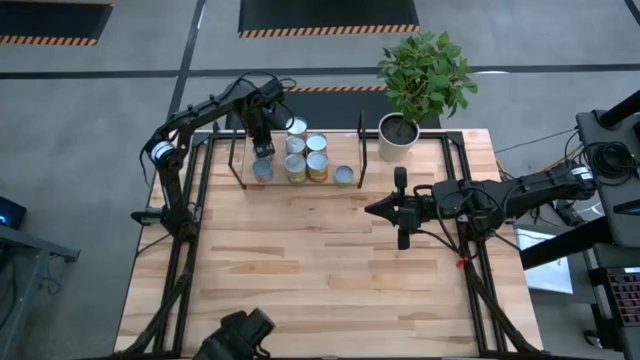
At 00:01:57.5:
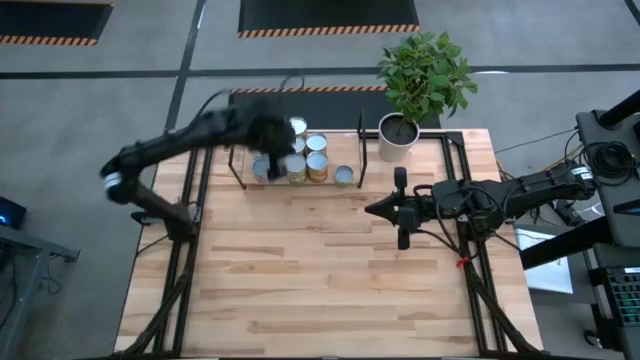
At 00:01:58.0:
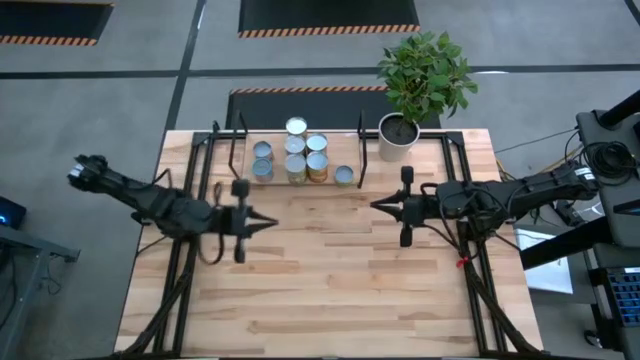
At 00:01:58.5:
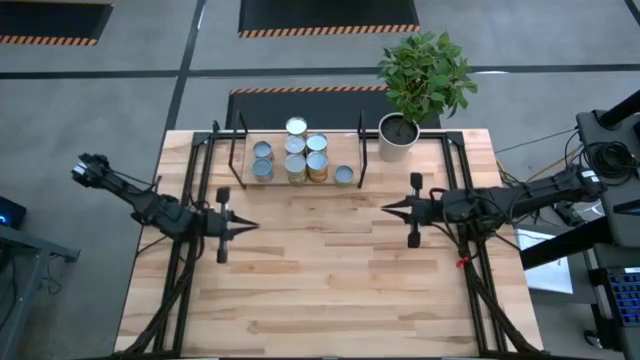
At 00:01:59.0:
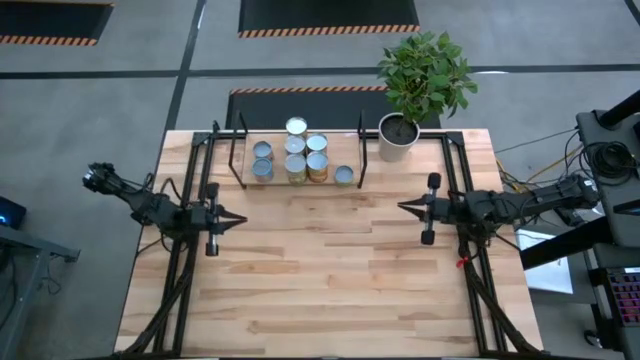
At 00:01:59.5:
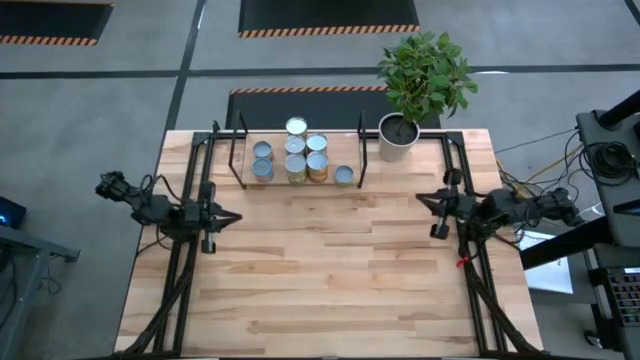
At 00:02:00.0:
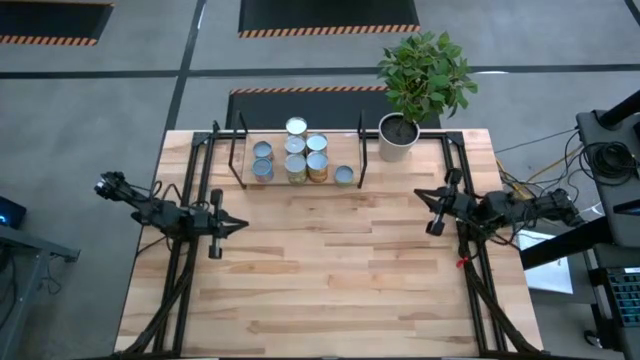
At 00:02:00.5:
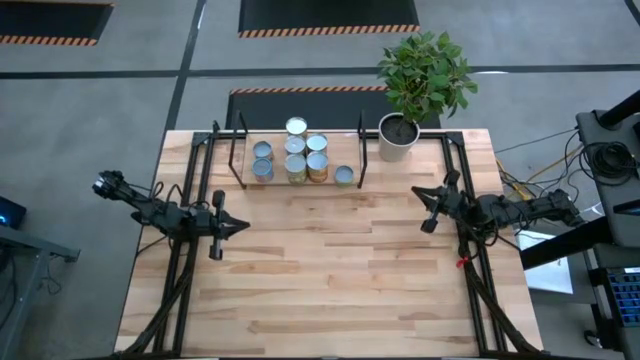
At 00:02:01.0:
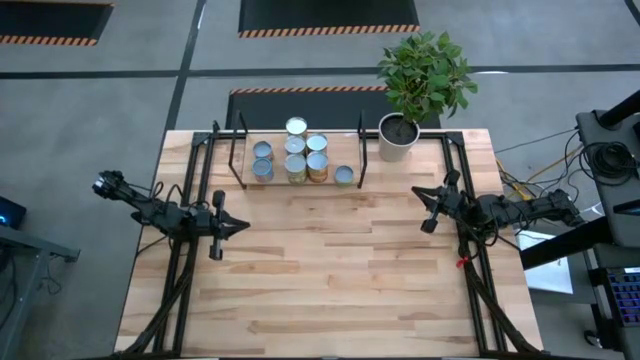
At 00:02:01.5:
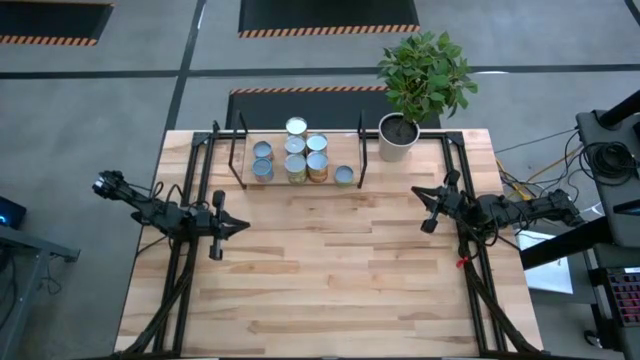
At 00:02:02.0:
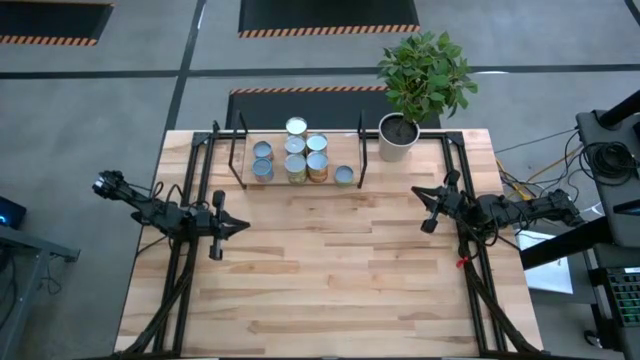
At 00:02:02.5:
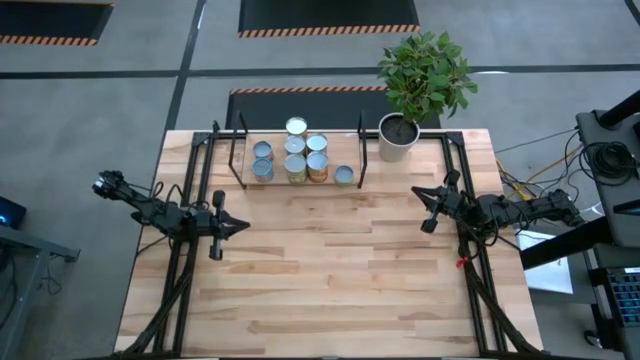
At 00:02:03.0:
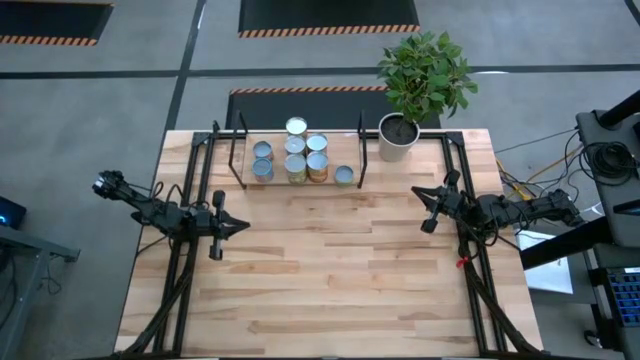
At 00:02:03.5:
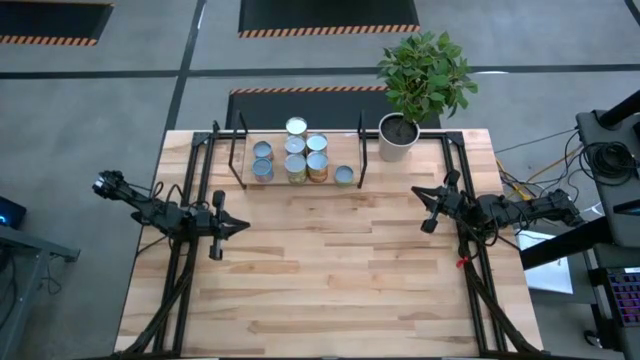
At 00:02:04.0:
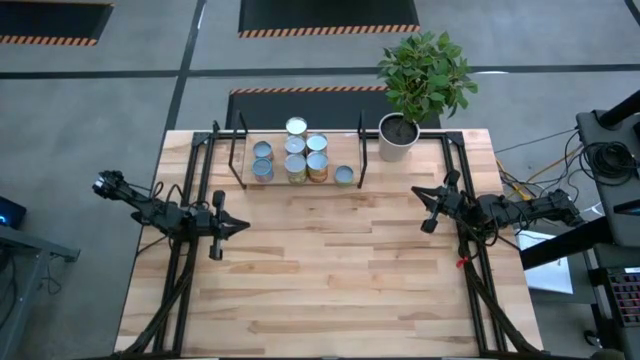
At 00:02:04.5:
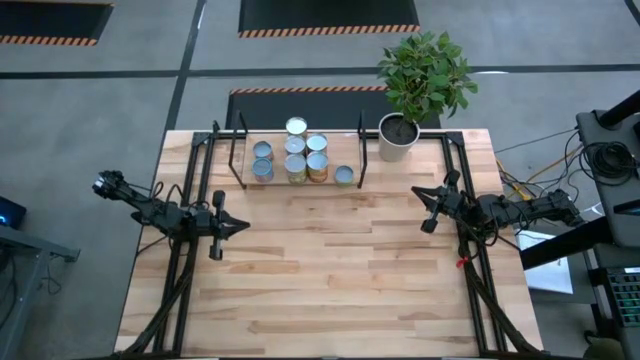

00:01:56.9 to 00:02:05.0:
Task: Pick and place cans onto a shelf
Return to Home Position

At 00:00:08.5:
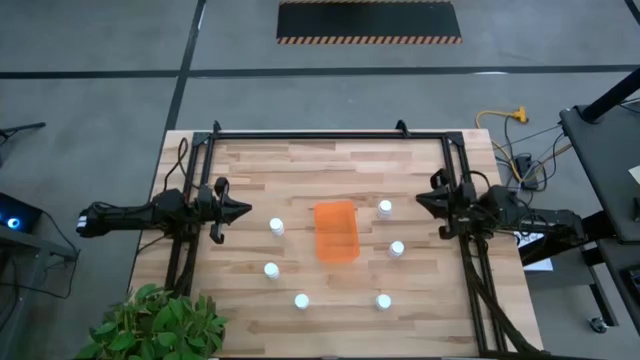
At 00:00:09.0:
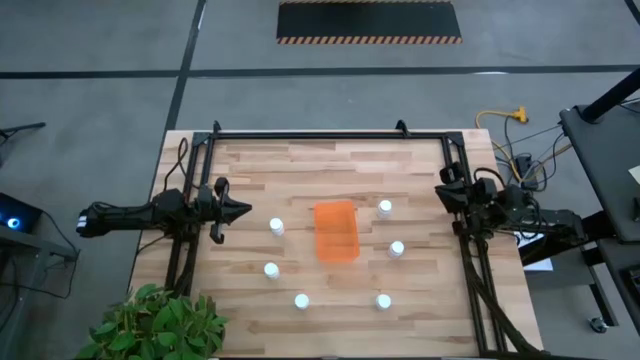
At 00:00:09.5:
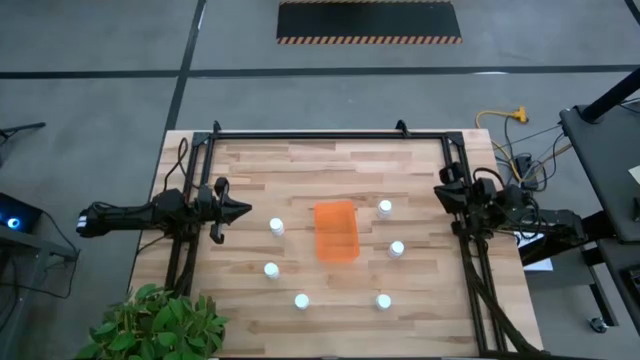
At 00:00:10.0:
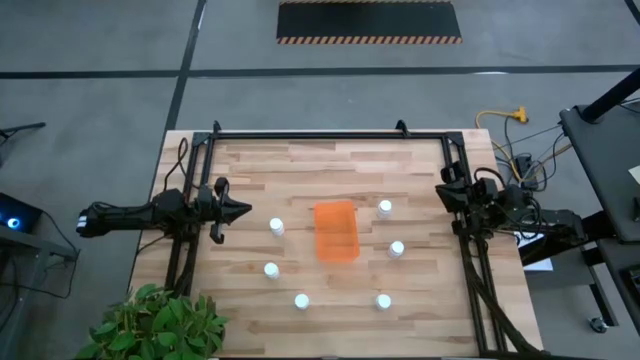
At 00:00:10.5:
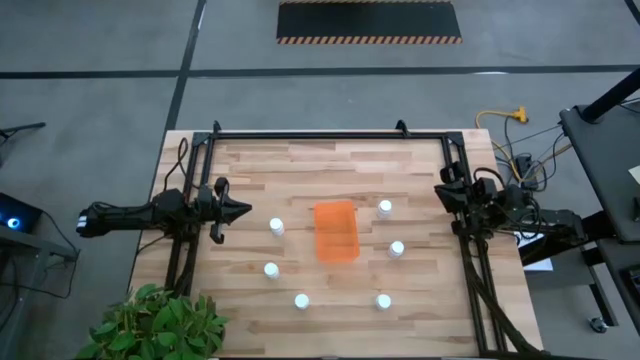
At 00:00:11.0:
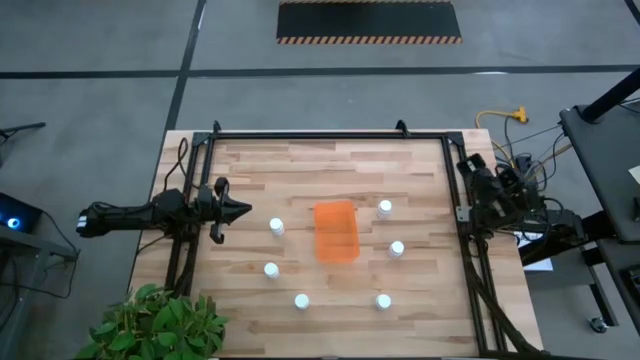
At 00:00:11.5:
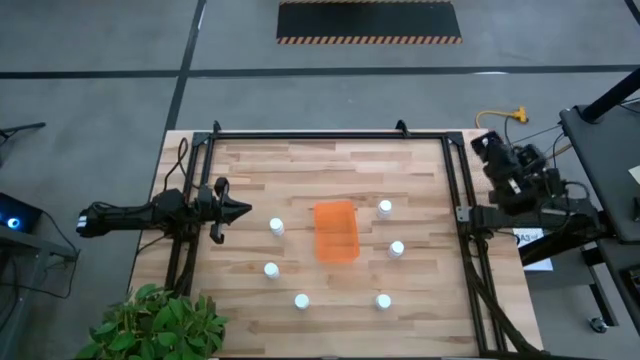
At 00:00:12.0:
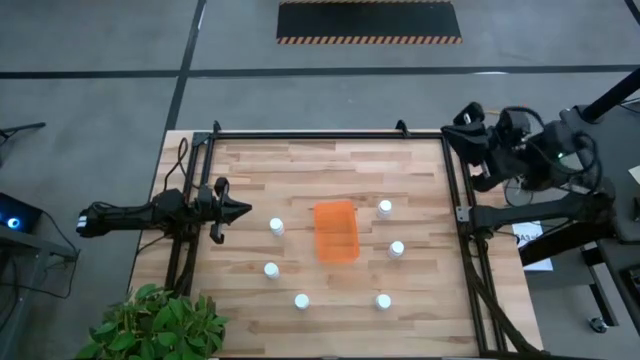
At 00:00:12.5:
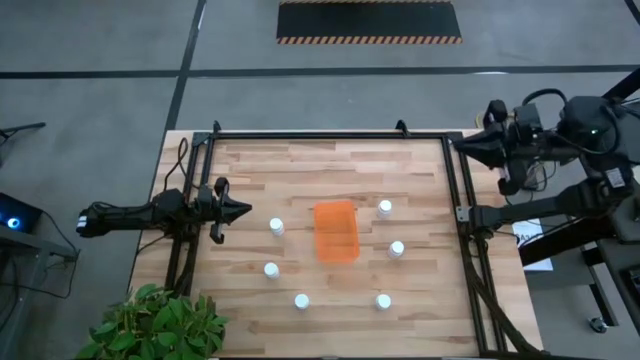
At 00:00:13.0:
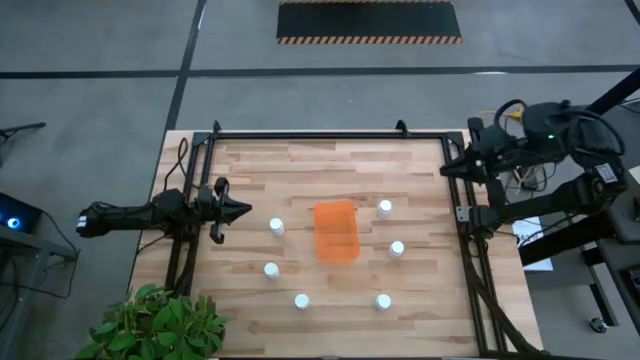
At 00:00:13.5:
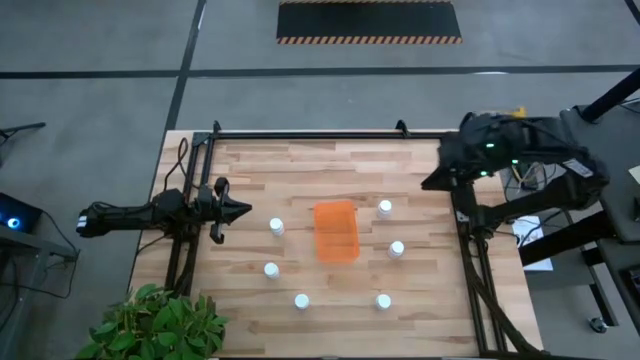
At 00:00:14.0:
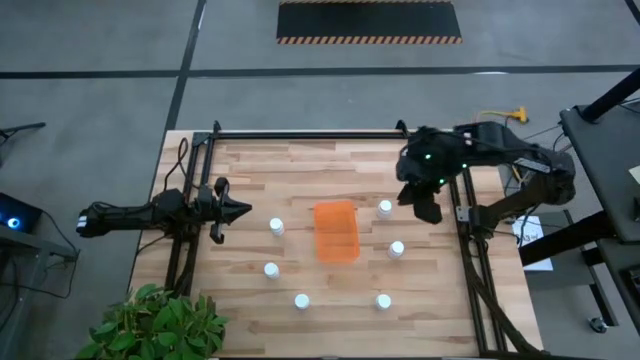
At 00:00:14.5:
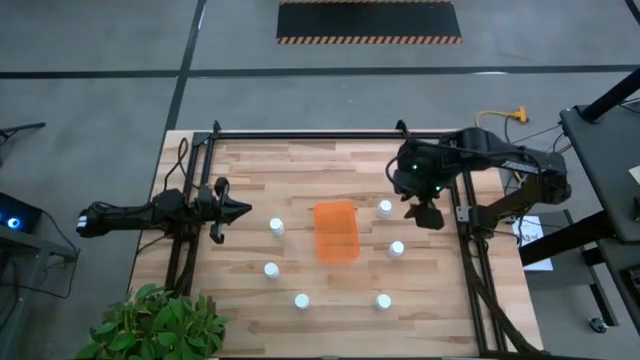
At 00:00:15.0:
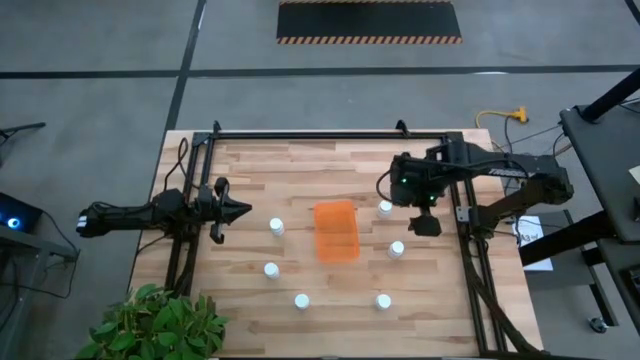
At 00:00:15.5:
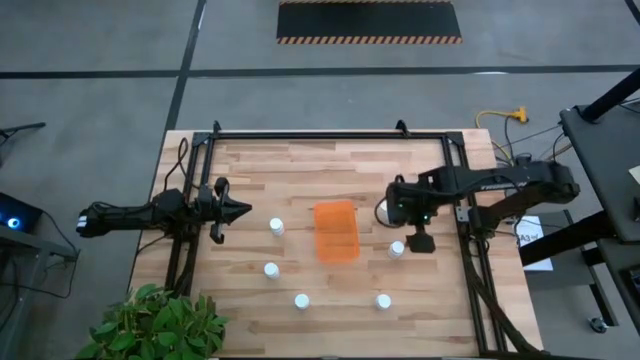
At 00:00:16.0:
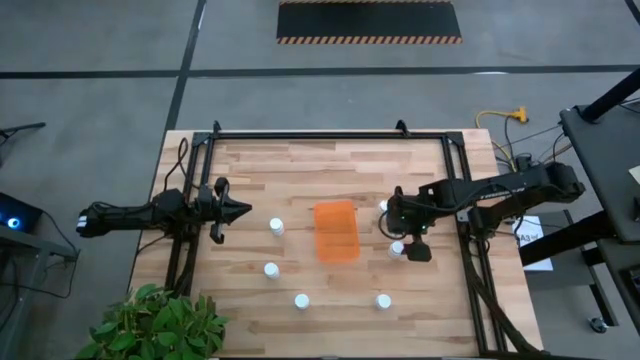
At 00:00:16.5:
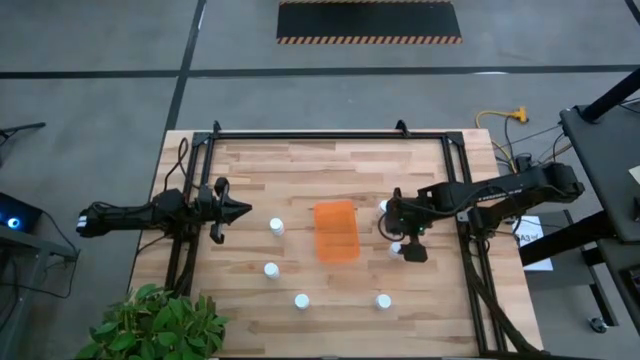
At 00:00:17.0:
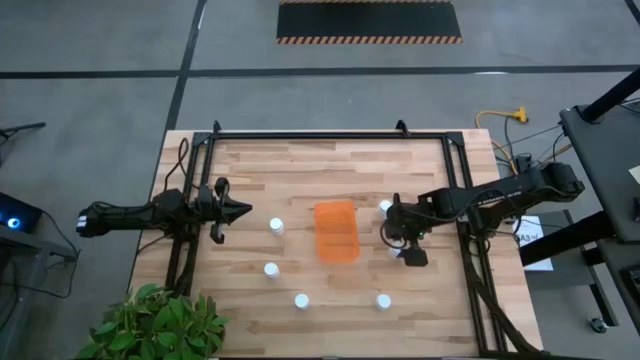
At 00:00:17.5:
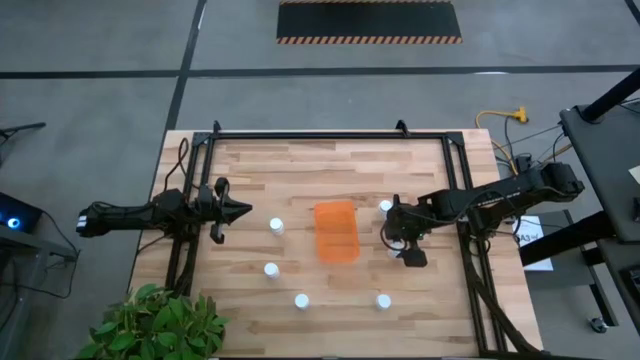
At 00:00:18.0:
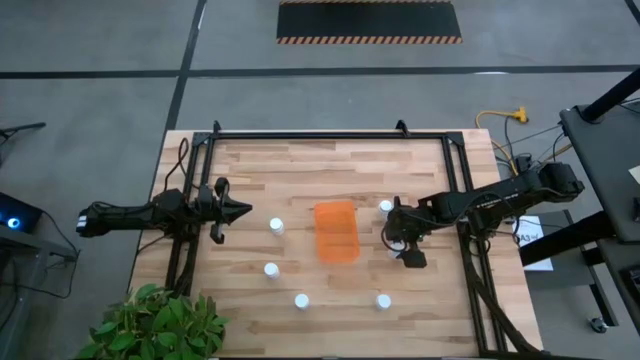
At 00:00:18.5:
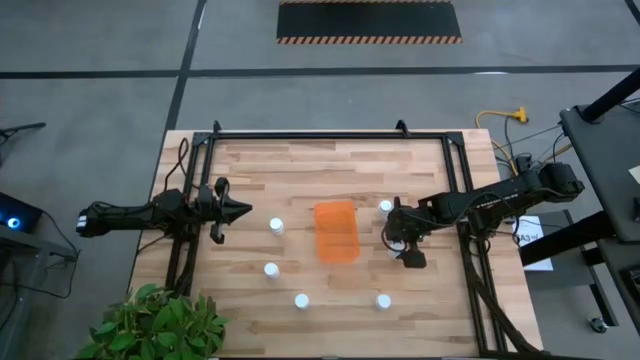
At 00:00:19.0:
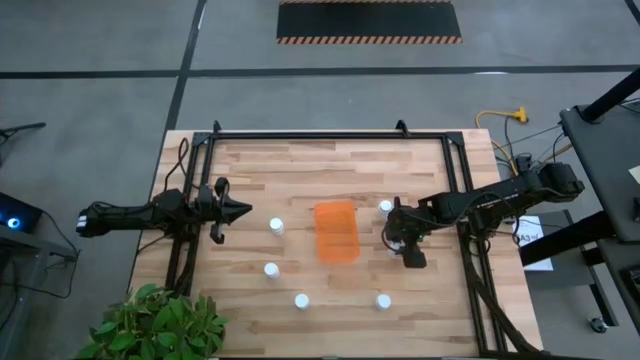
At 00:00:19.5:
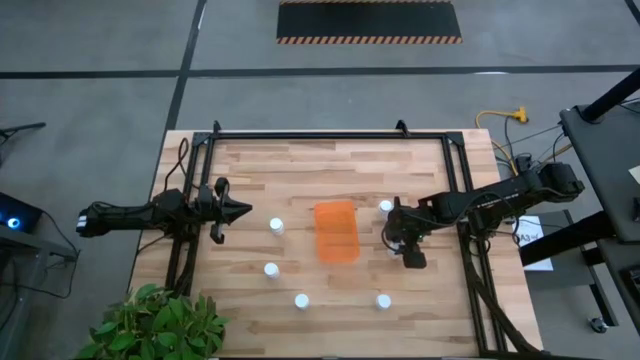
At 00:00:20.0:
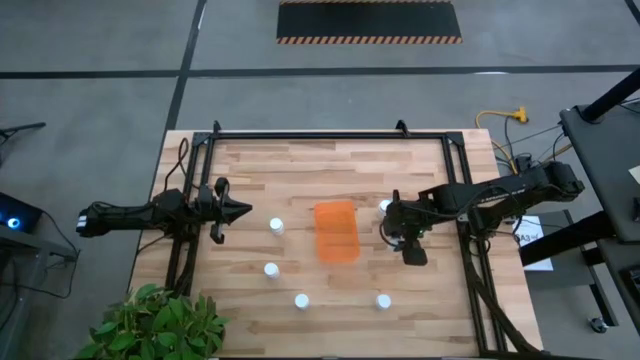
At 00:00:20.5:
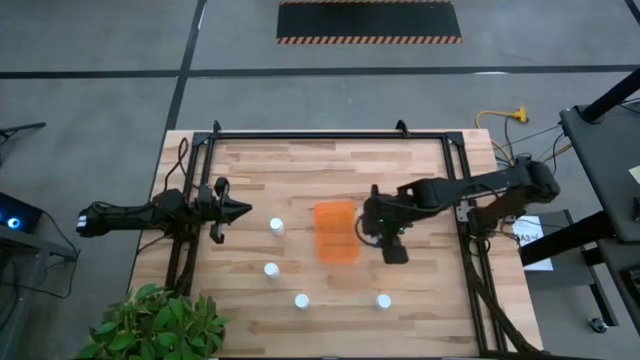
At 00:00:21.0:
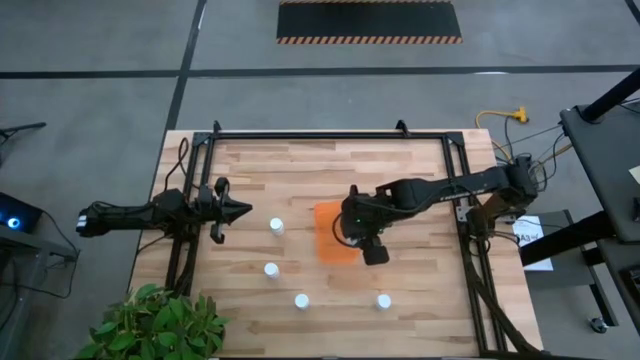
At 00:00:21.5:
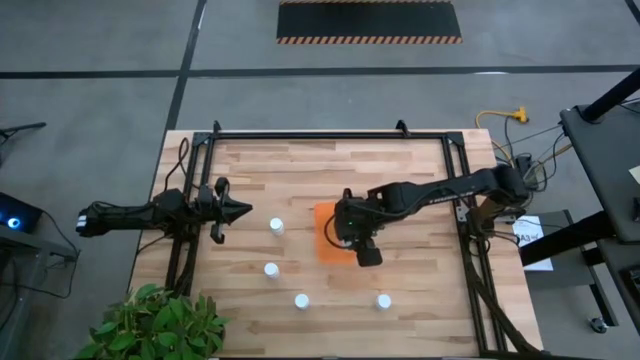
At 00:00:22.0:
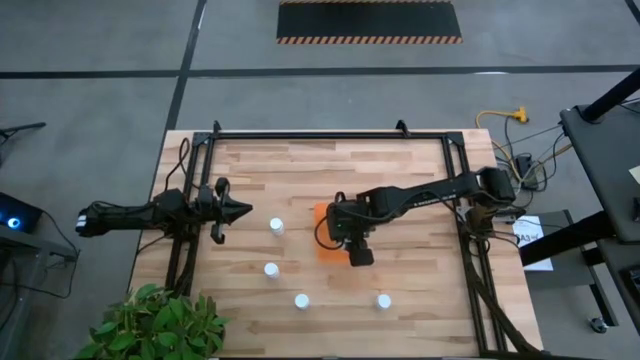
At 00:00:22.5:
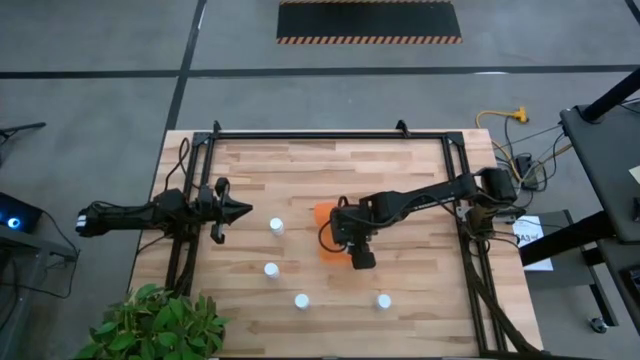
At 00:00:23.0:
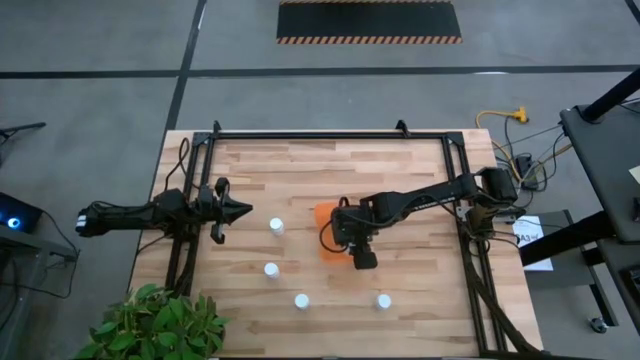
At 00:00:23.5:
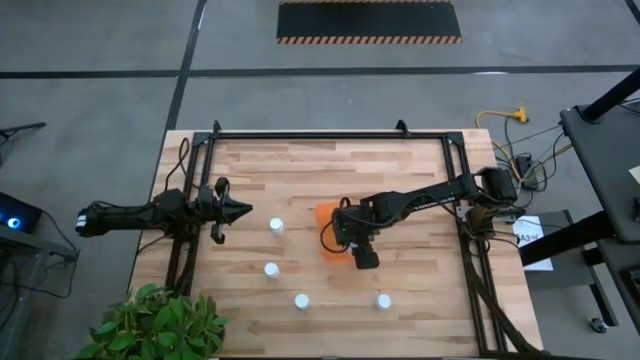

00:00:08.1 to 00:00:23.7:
Task: Pick and place pill bottles into a basket
Put the middle right white pill bottle into the orange bin
